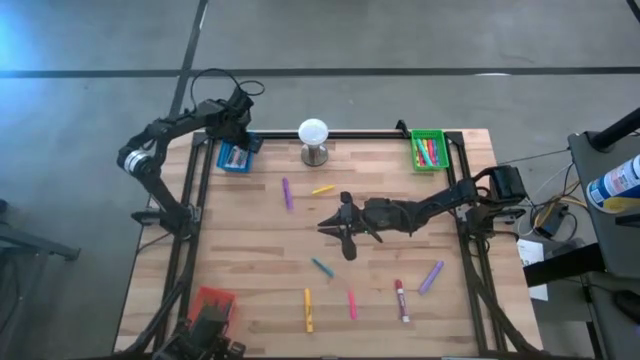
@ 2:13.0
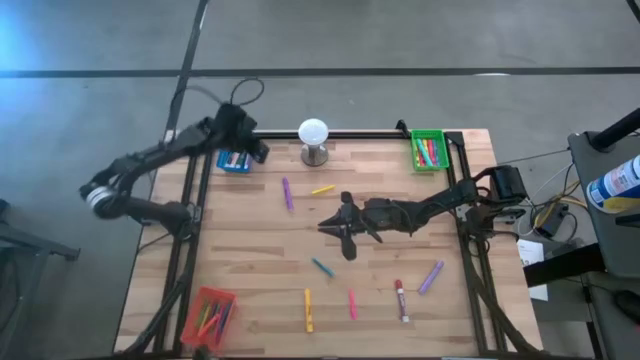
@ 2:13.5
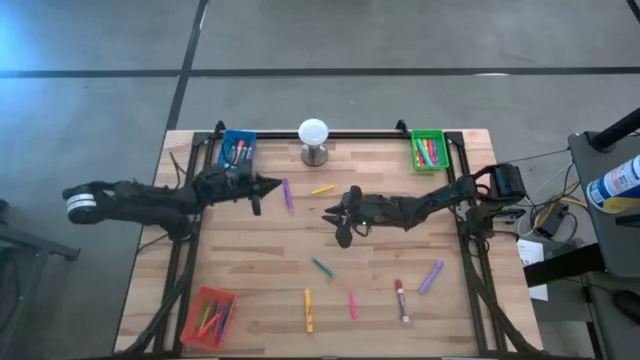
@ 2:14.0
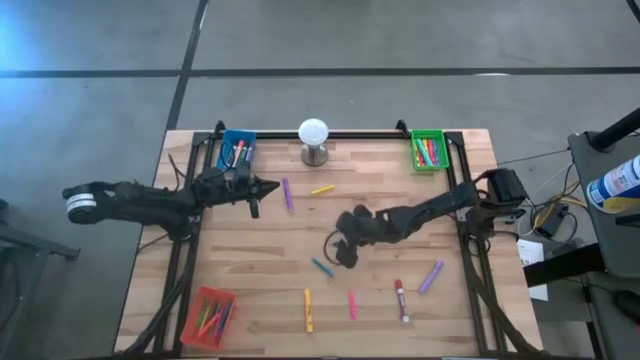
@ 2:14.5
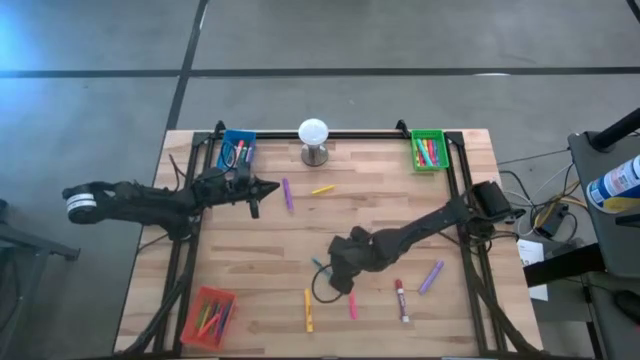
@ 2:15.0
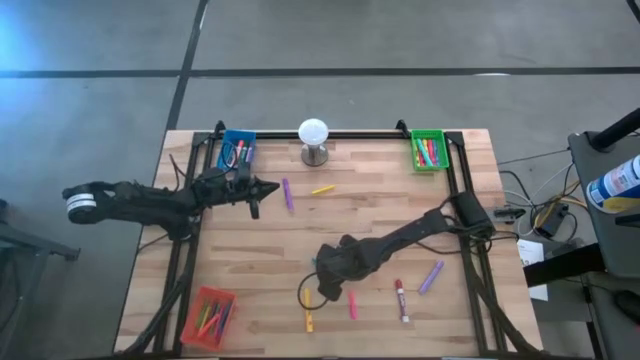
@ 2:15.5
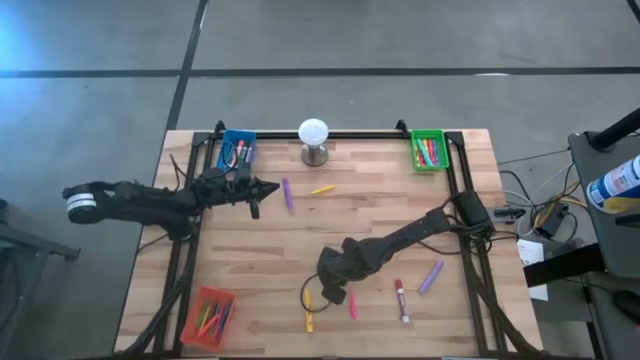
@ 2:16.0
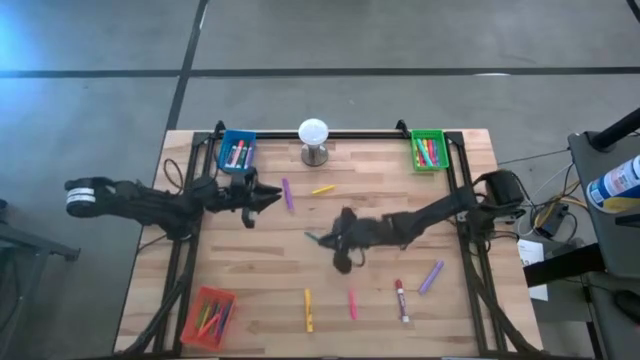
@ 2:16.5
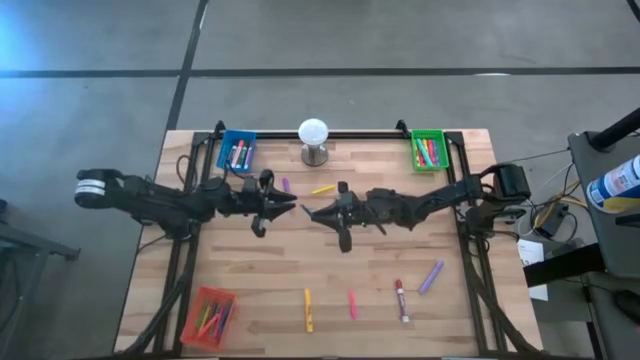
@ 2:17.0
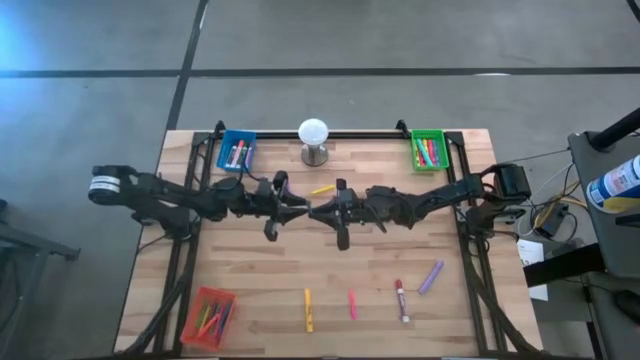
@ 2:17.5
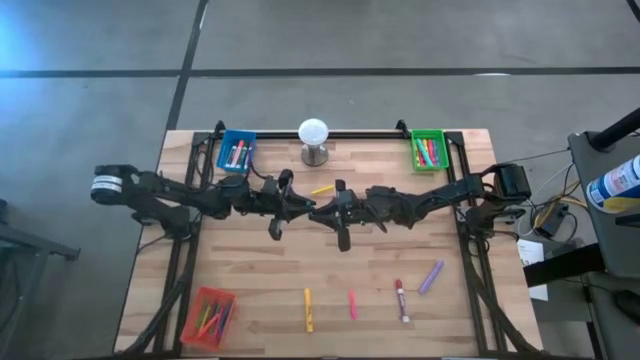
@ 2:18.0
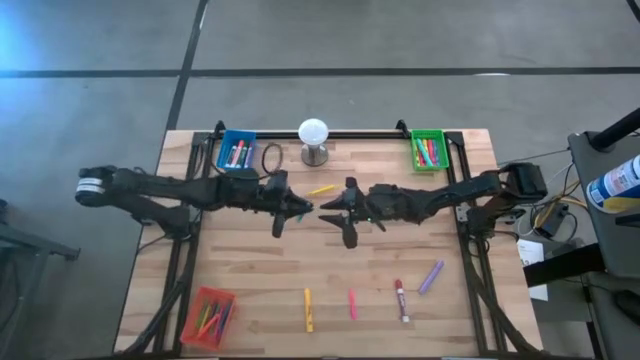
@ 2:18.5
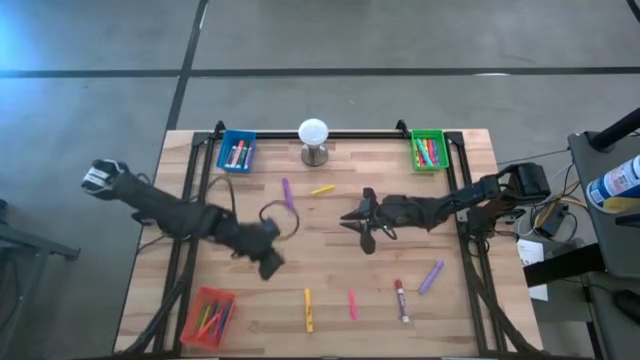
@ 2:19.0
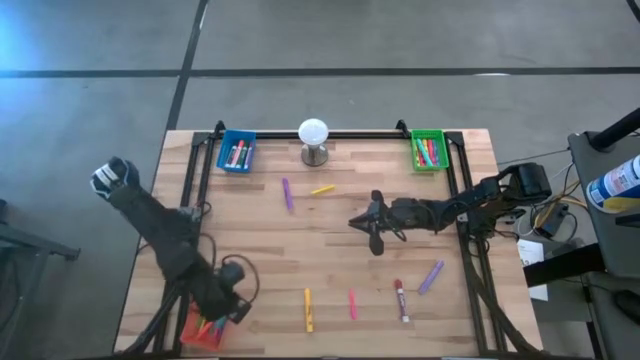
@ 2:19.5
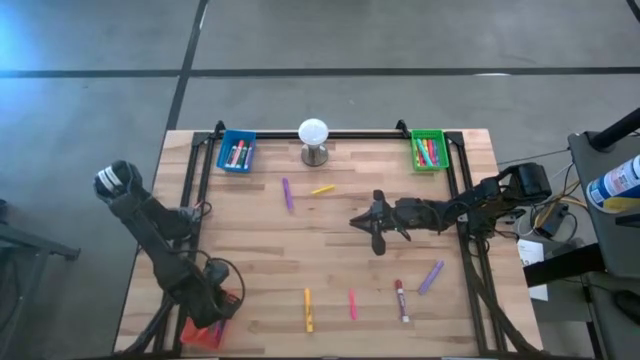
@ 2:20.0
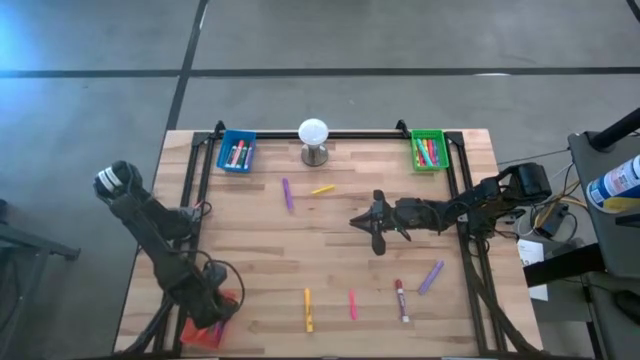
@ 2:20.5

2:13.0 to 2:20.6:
Task: Pick & Place Markers
Put the blue pen into the orange bin

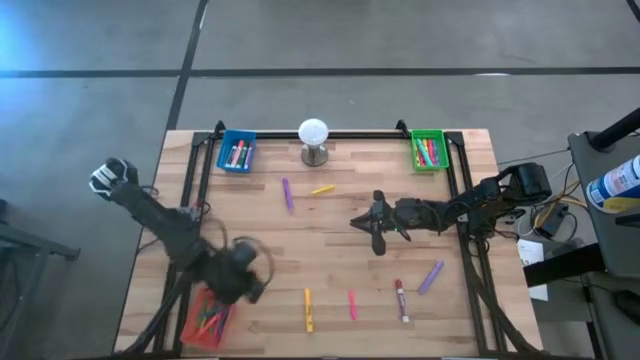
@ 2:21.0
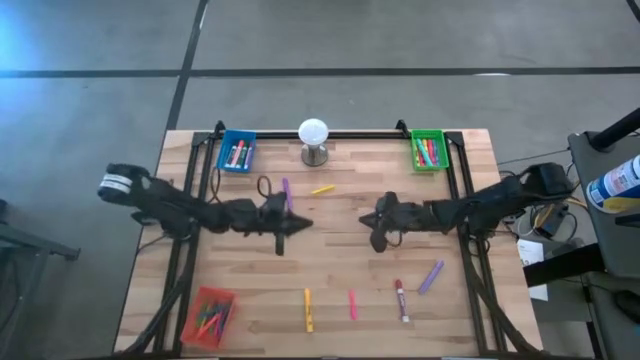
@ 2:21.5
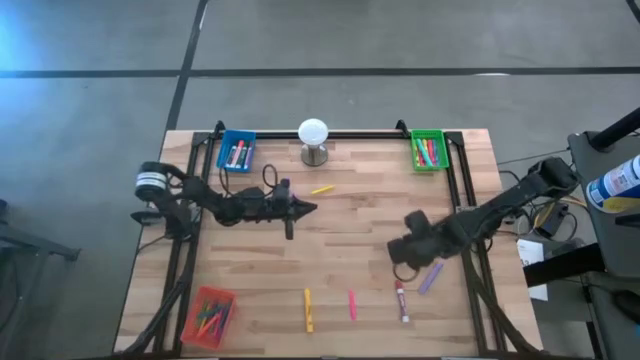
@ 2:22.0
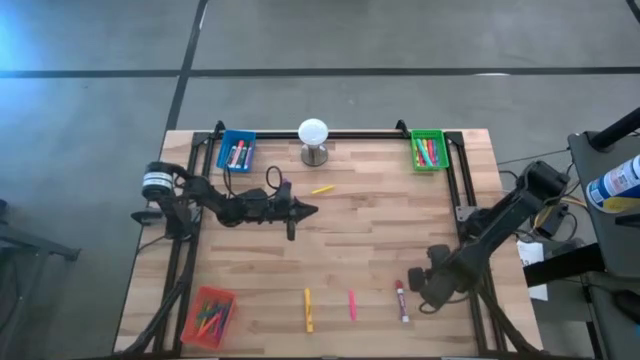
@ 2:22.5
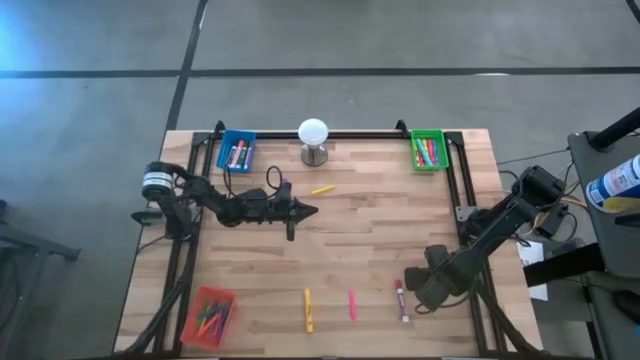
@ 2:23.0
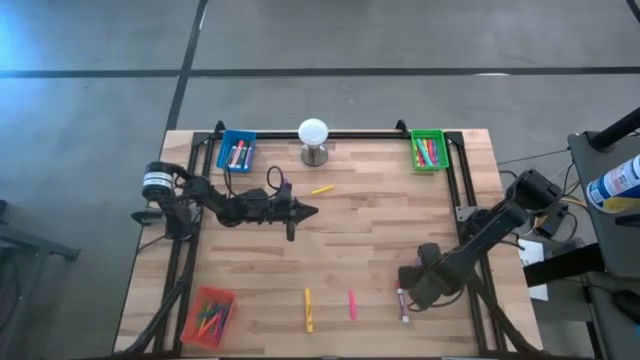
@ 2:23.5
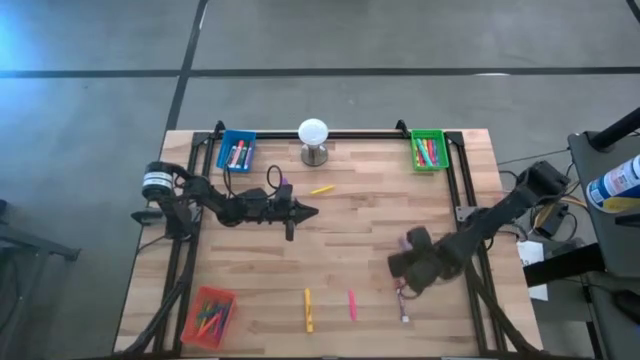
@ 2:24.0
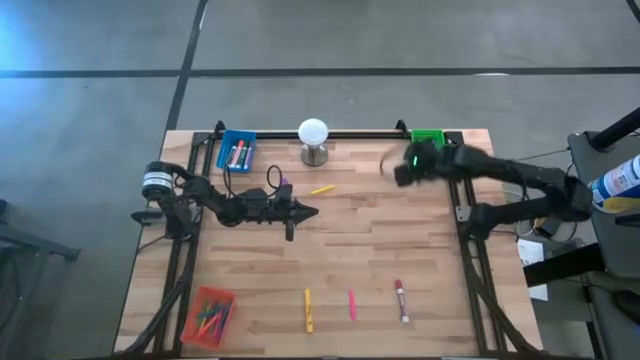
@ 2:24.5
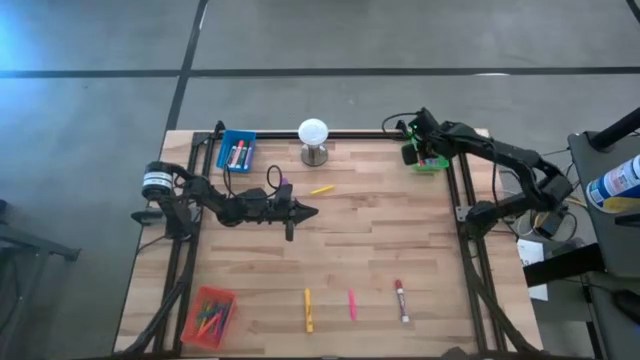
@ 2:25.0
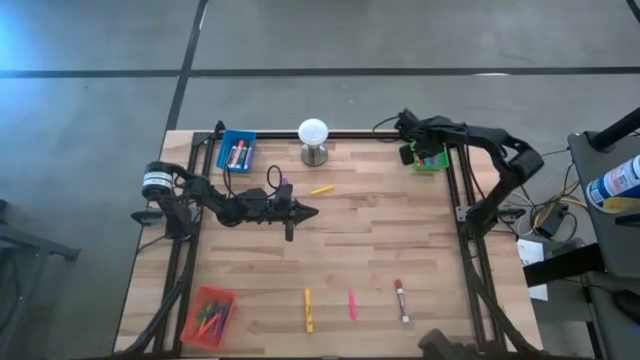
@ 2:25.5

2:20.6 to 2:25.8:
Put the bottom violet highlighter pen into the green bin

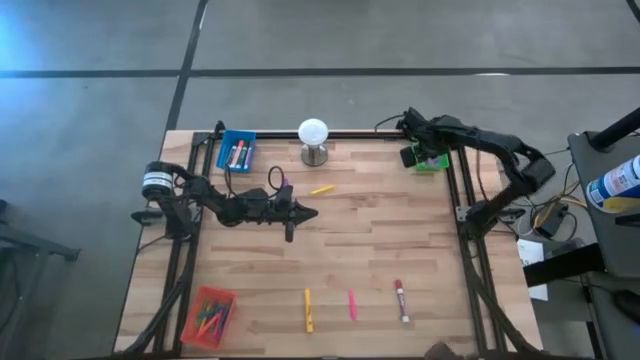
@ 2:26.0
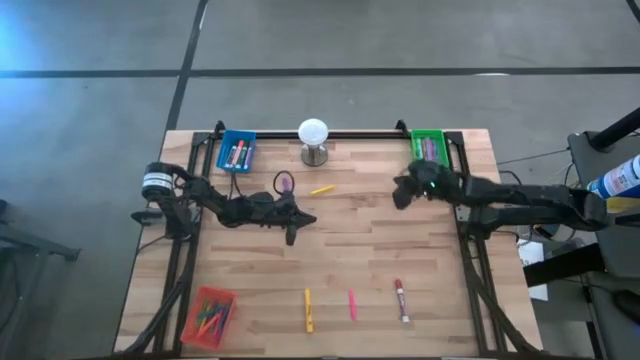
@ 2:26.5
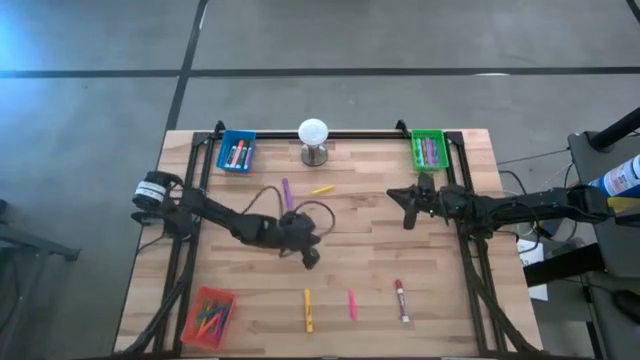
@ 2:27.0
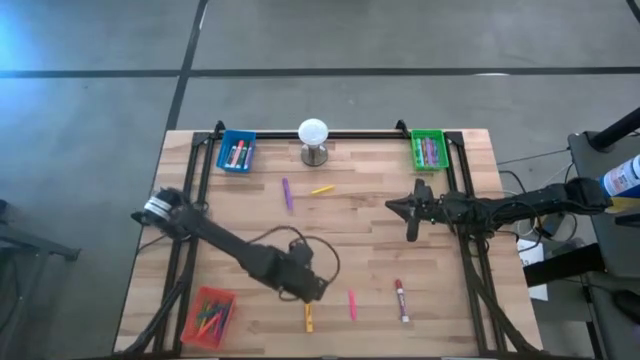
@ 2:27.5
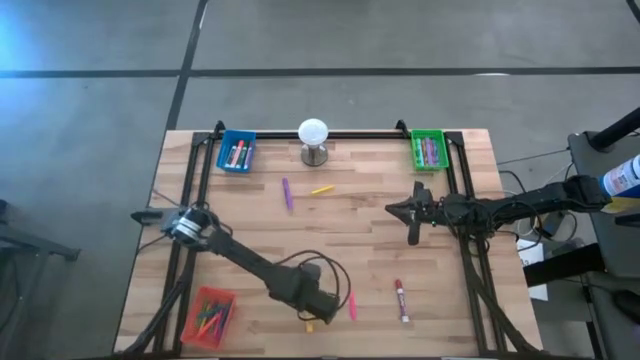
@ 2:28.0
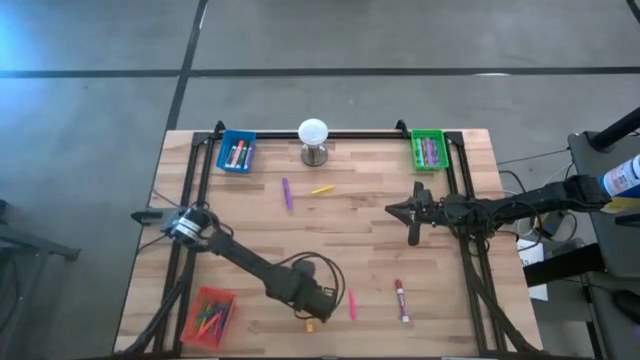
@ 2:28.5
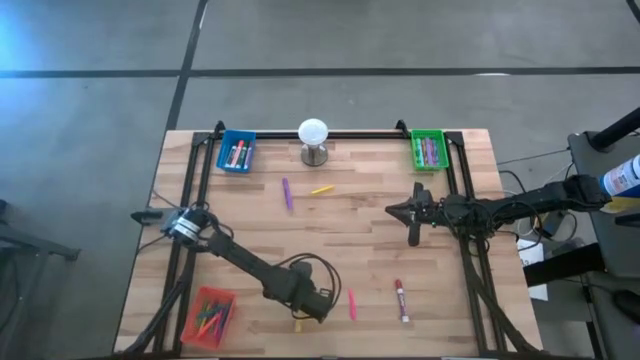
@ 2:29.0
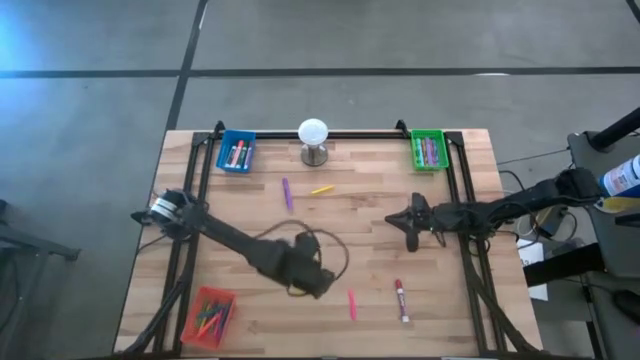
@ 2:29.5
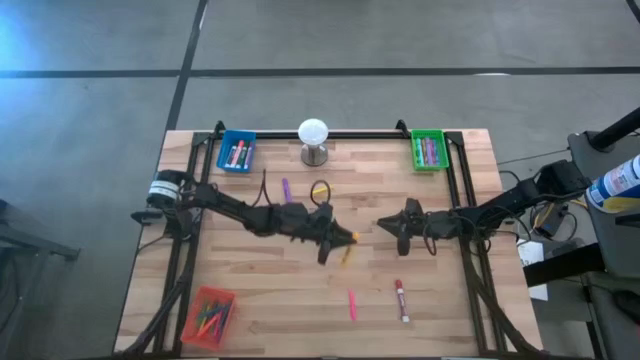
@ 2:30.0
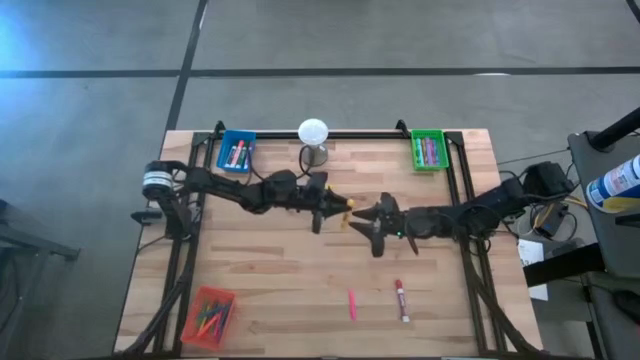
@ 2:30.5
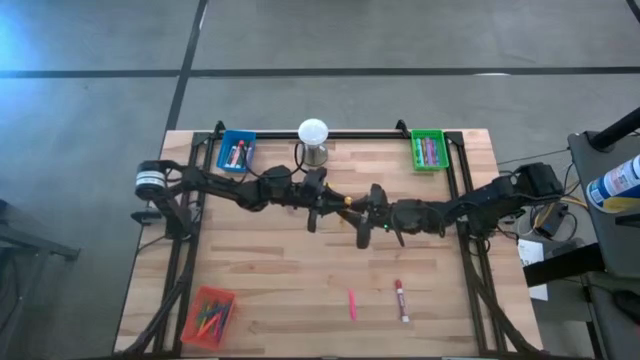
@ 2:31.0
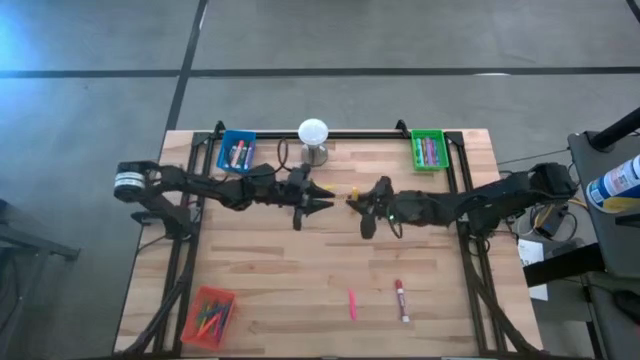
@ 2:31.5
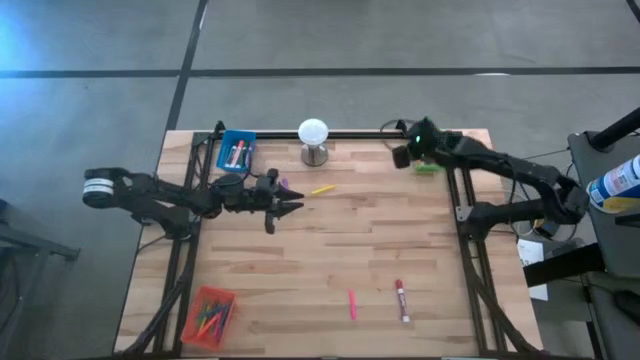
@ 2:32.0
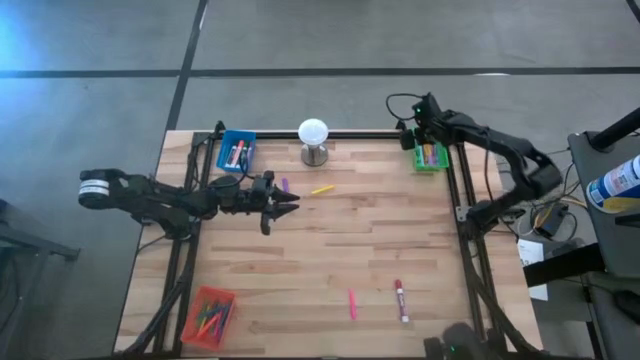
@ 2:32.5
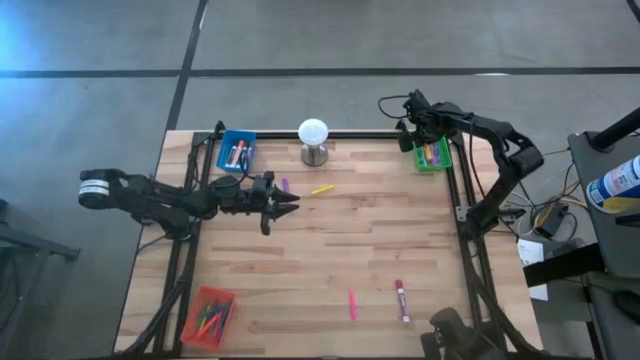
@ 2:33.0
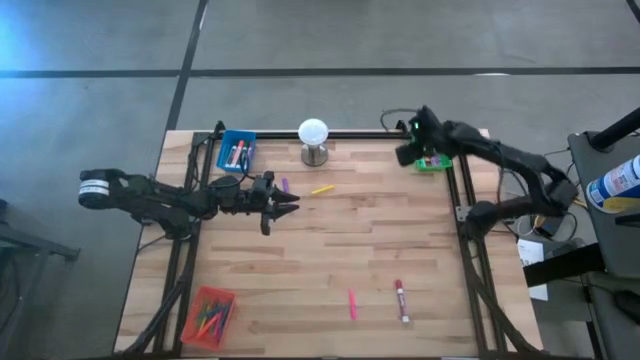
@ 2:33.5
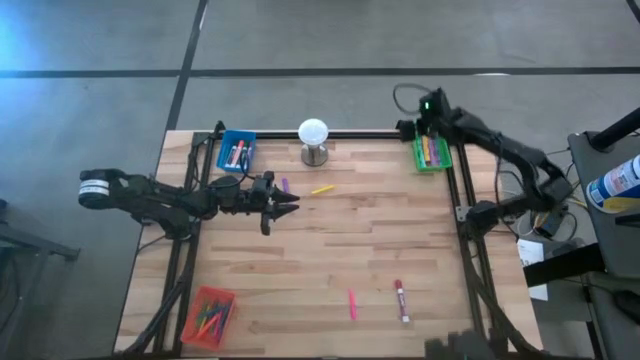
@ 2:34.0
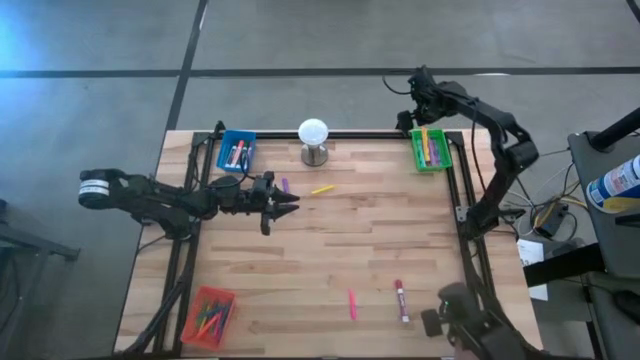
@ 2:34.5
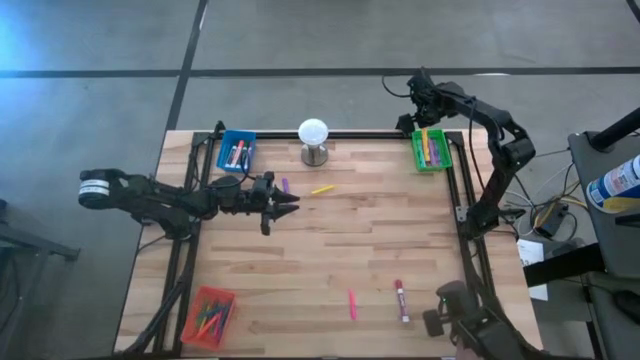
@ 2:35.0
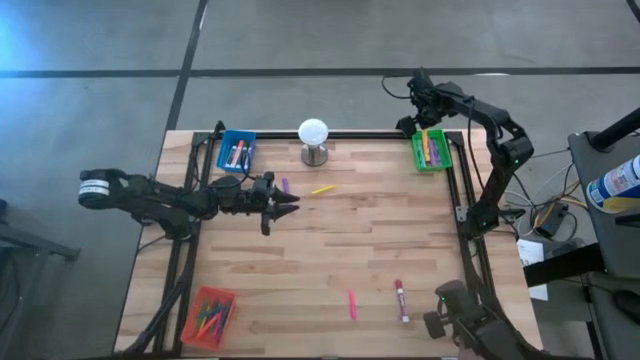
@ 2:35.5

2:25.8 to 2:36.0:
Put the yellow highlighter pen into the green bin
